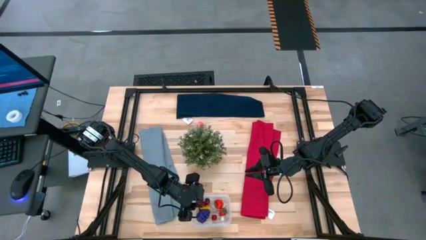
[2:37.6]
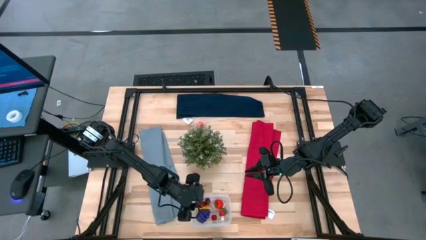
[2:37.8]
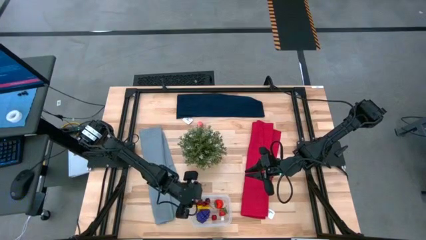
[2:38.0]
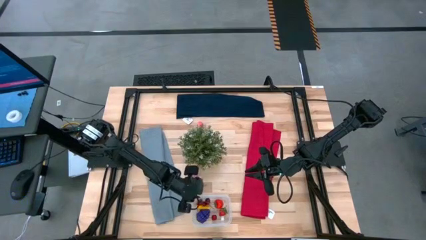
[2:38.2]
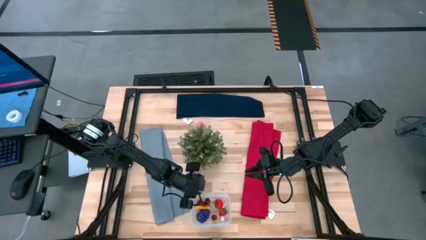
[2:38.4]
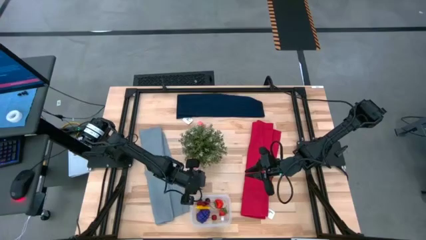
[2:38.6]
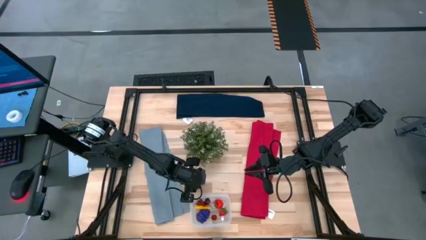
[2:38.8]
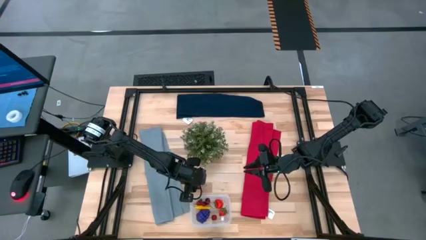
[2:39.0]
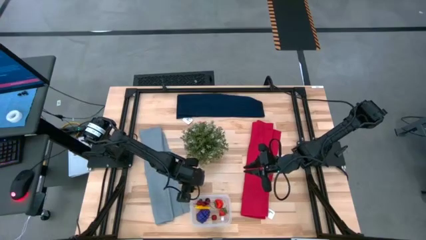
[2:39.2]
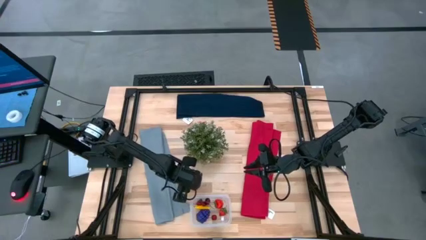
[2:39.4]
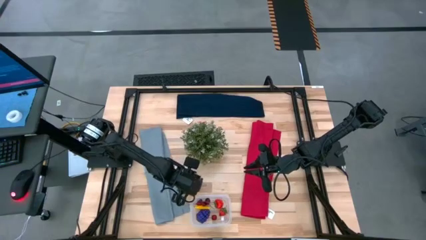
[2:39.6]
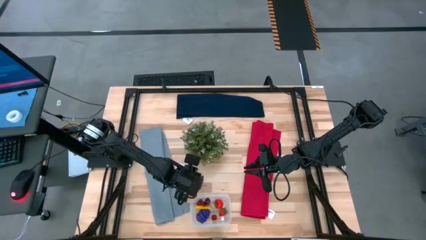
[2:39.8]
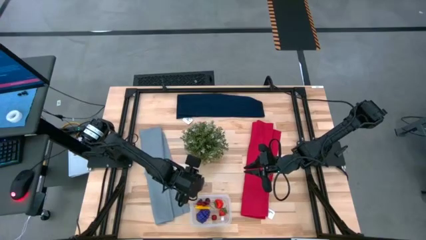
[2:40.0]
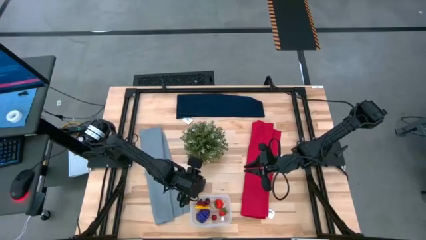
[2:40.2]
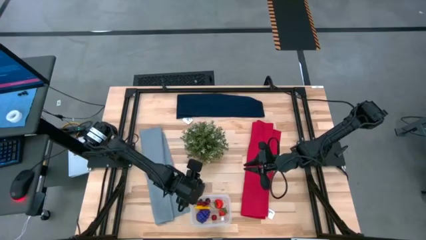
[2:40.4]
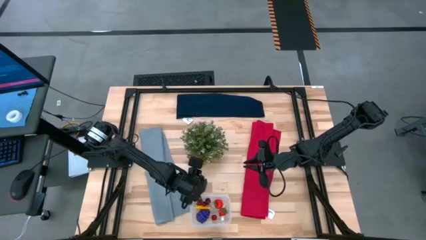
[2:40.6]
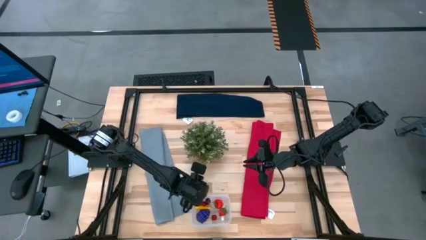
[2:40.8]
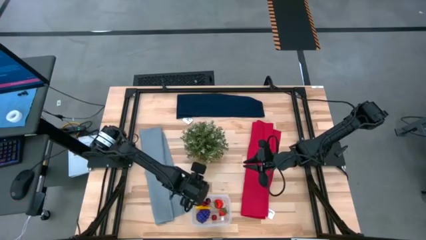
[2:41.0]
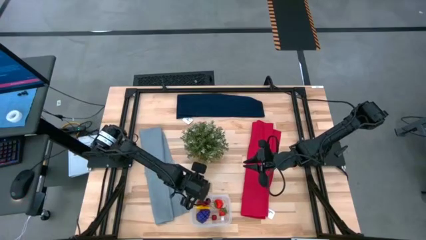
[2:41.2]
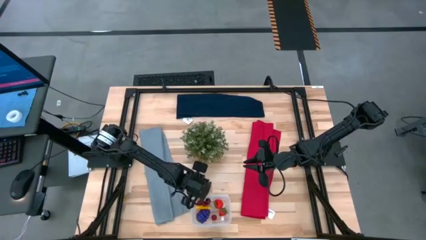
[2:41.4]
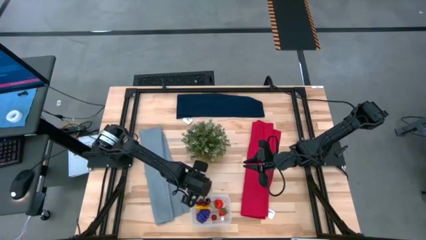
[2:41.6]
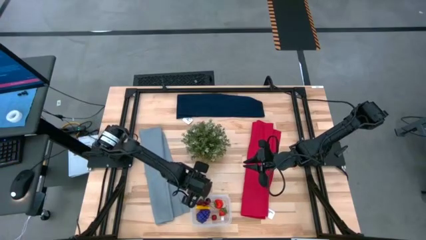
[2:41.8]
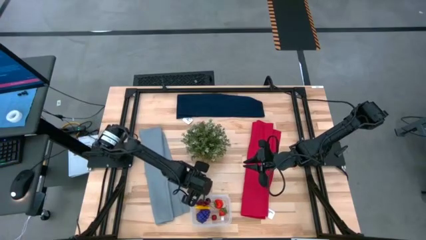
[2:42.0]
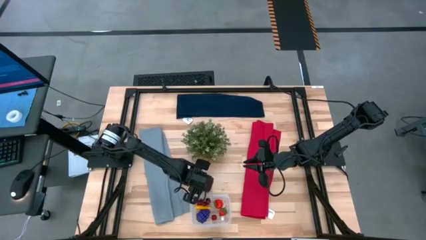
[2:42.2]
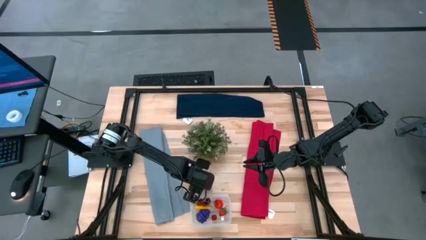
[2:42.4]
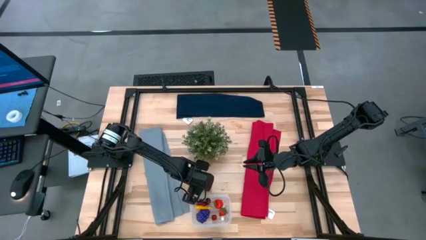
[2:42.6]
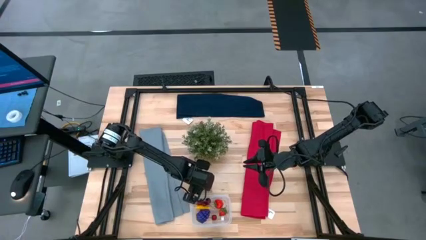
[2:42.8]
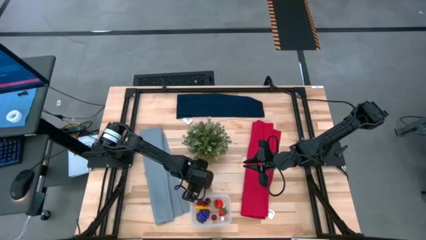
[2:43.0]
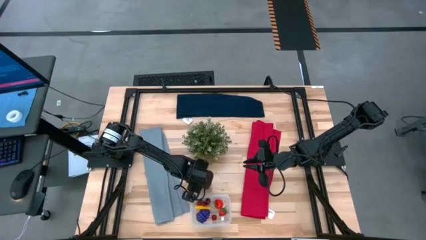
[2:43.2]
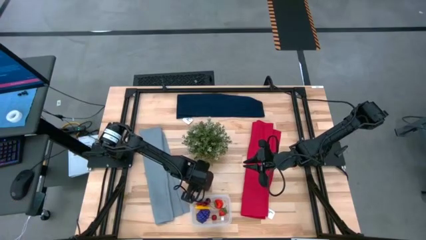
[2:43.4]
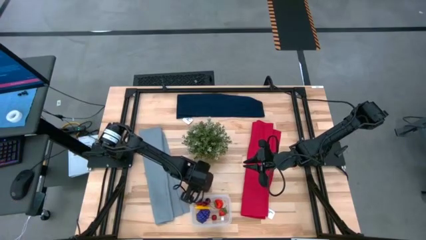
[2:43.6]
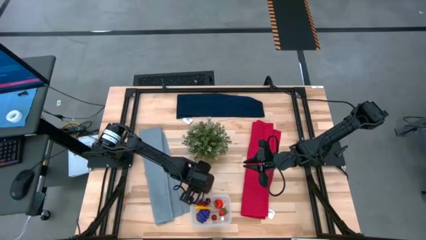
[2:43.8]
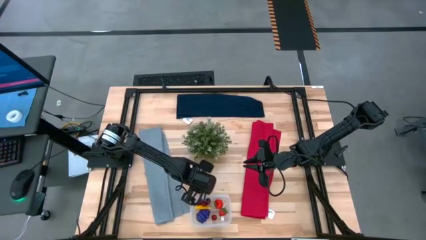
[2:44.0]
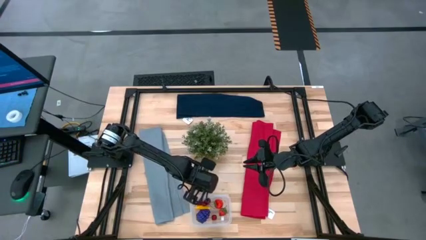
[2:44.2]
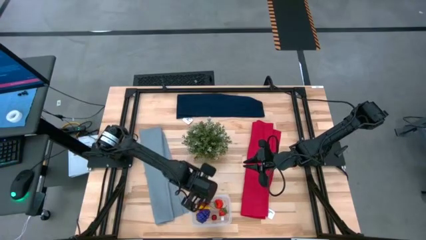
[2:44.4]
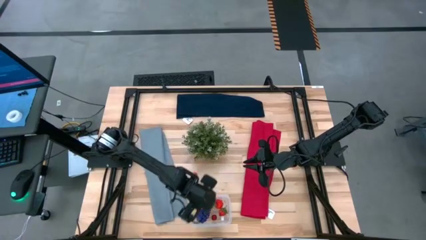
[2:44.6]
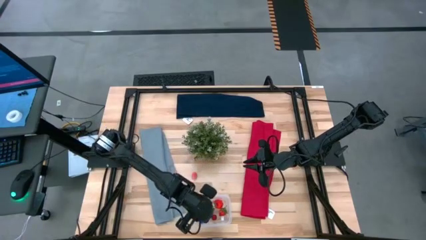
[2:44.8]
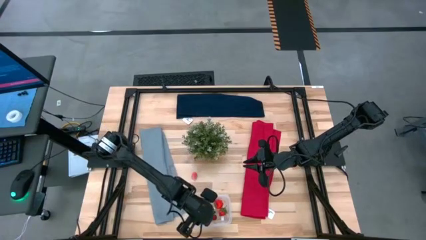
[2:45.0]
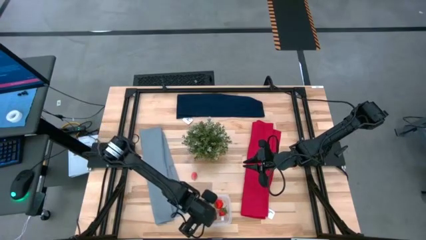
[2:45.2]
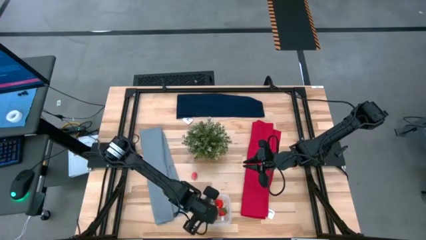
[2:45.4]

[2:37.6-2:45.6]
Task: Pick and placing Produce into tupperware
Put the cherry into the transparent container

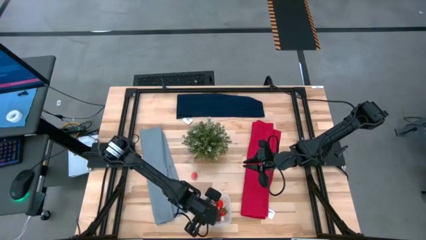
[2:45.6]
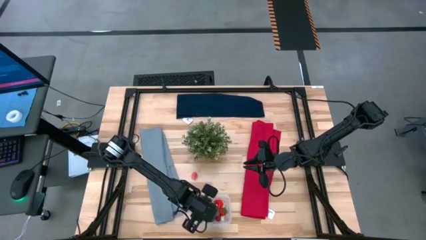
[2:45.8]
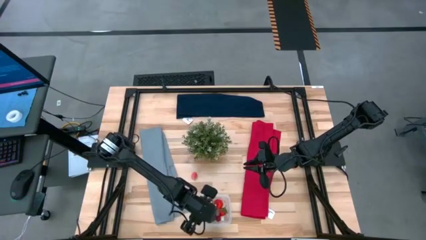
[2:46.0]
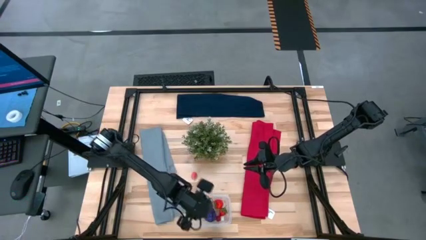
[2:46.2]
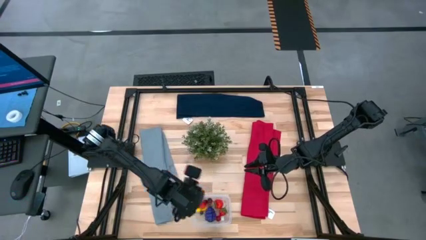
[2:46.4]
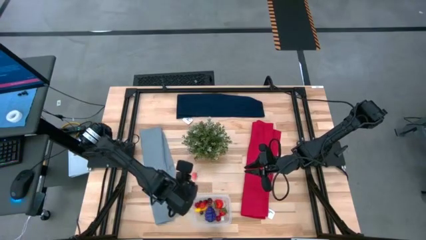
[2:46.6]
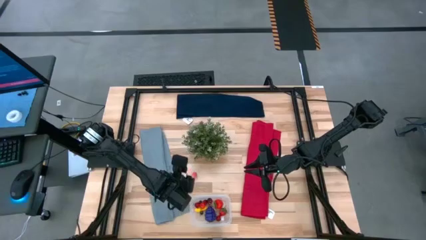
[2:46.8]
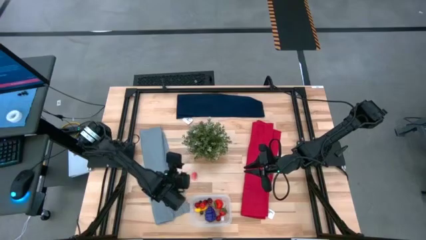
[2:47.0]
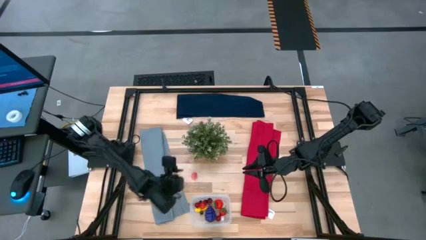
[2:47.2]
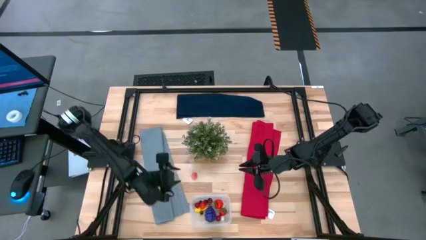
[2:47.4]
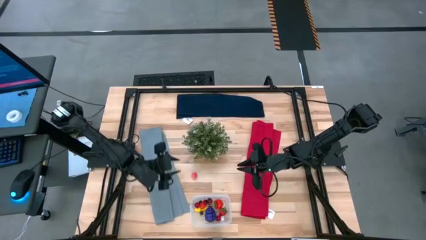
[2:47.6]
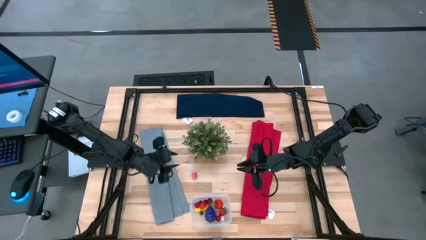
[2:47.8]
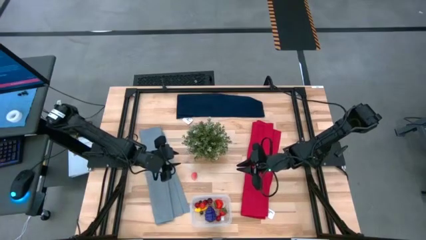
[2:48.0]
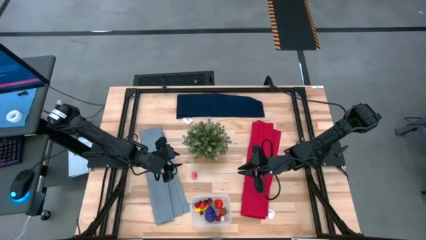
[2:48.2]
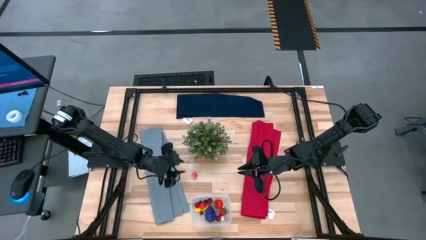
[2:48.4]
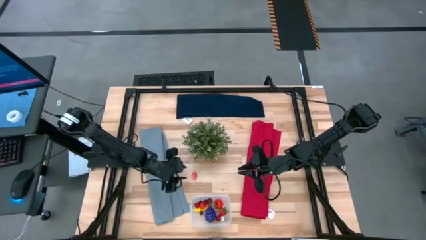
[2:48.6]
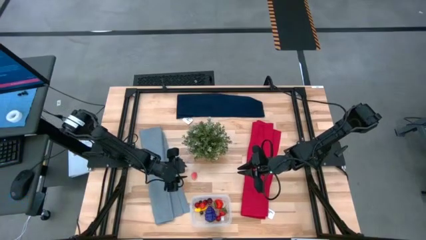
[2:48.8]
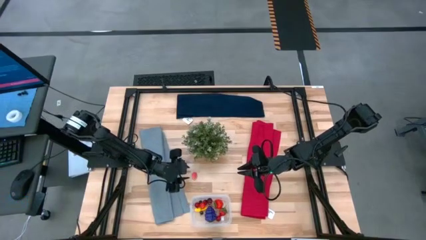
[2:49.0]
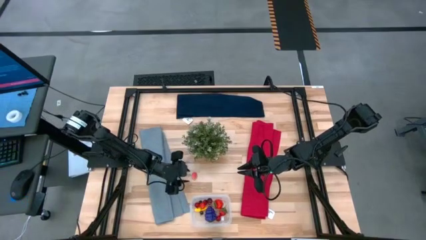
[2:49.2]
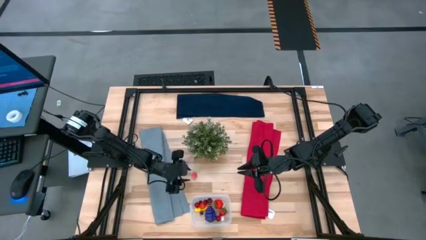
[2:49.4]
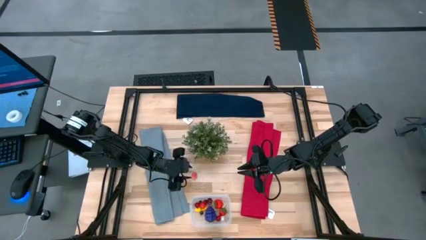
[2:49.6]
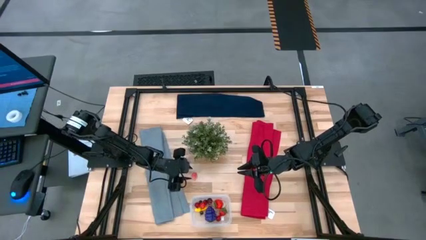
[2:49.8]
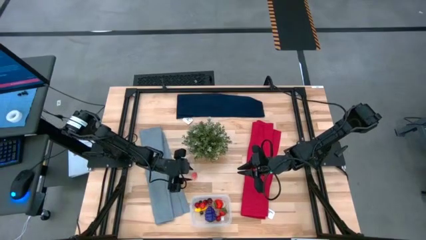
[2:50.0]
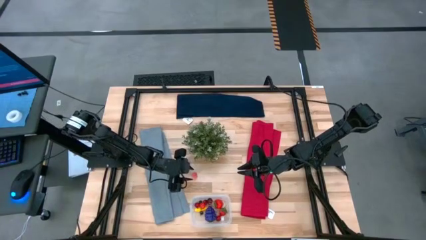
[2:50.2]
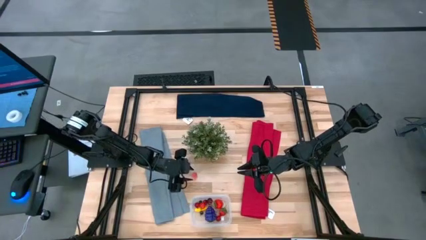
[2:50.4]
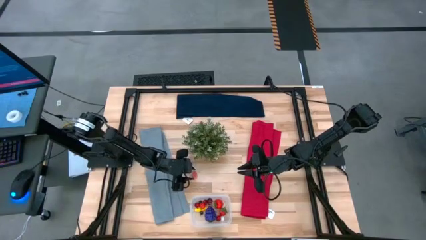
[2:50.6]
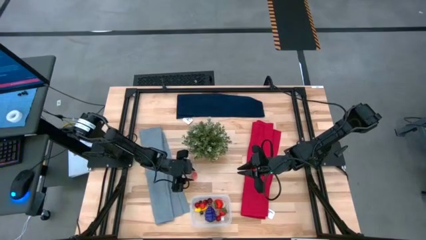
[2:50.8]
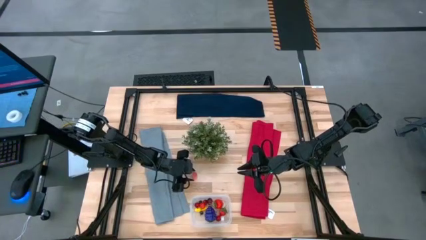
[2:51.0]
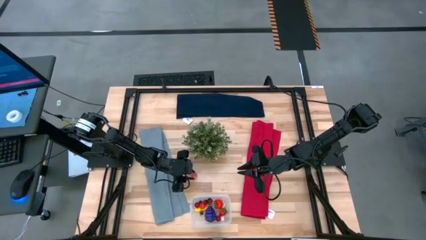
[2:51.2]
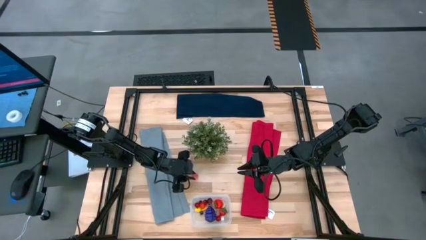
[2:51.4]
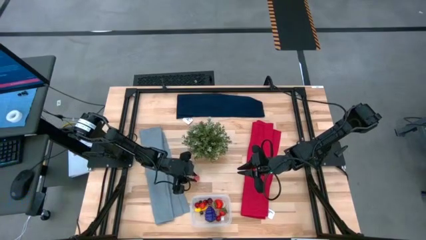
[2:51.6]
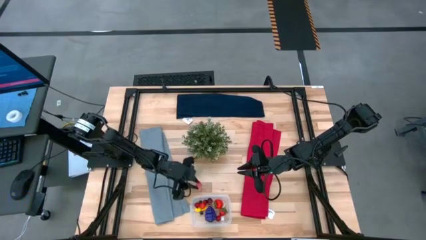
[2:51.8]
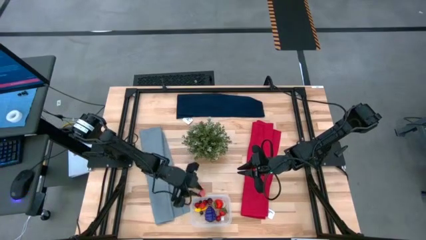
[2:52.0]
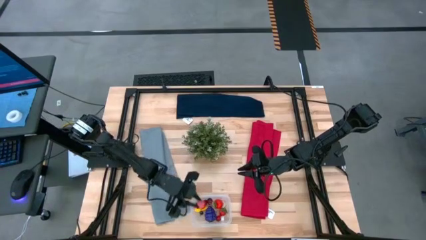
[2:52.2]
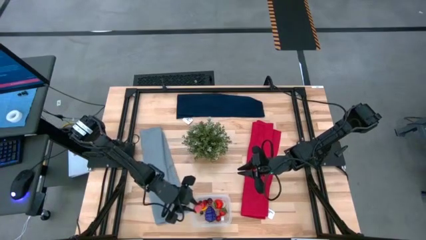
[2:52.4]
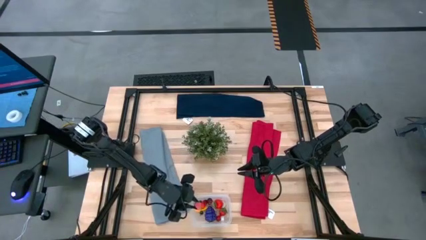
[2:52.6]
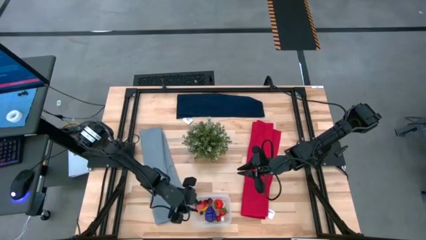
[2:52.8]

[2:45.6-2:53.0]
Put the bottom apricot into the transparent container
